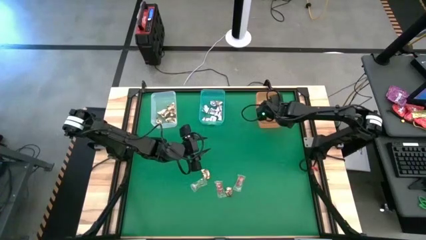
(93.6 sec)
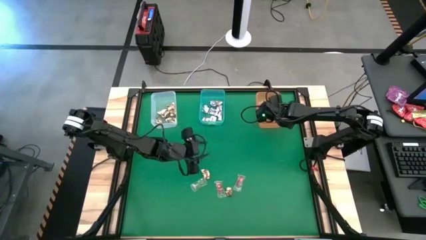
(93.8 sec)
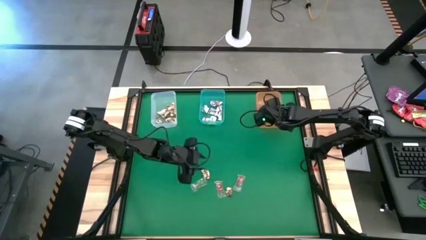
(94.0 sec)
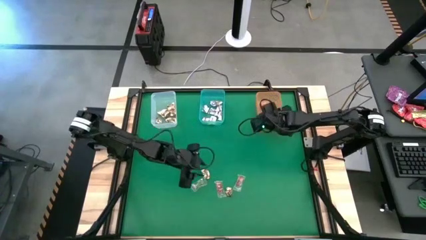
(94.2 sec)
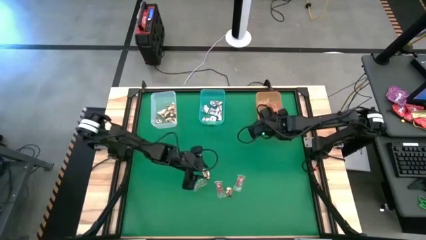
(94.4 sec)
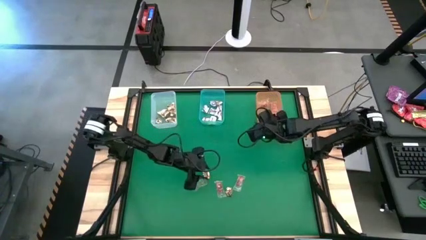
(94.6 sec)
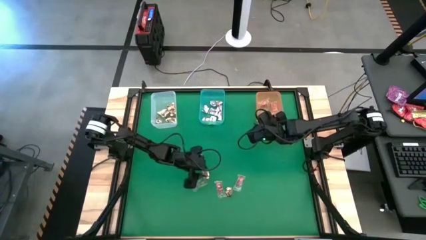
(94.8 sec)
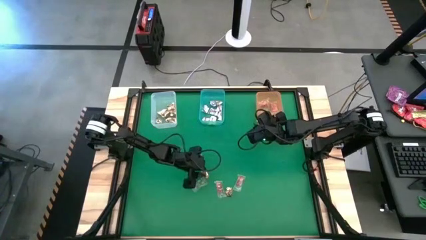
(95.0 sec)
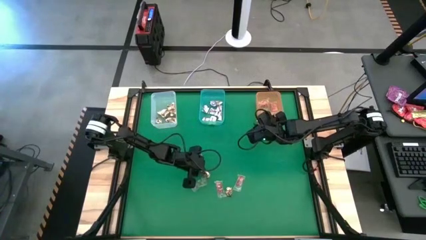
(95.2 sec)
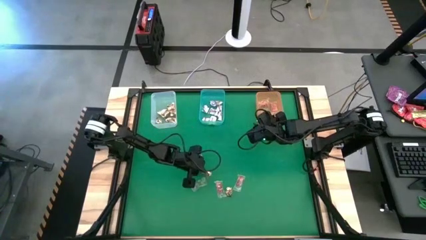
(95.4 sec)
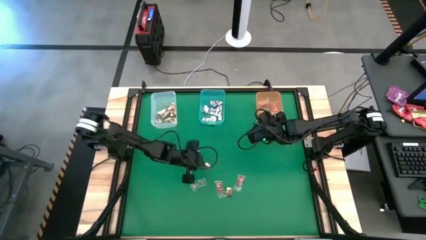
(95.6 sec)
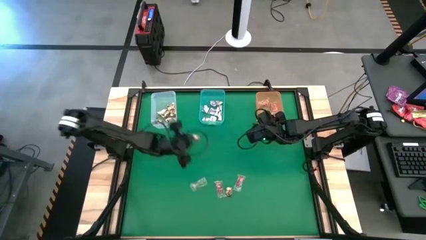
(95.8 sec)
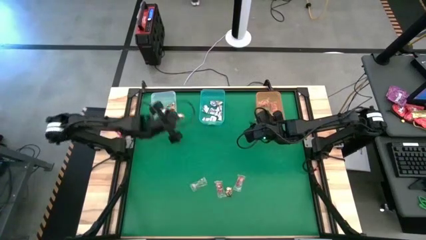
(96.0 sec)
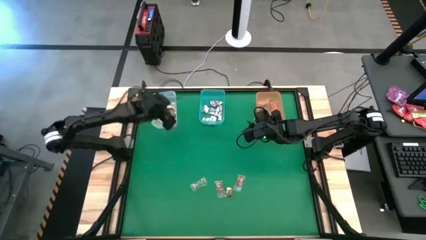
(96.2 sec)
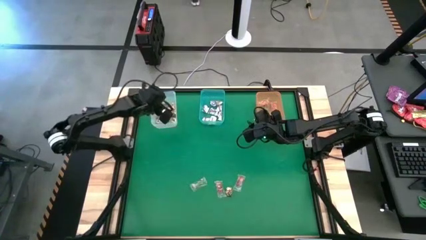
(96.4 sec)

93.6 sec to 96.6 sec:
Task: Sort candy by brand, put in halloween buckets
Put the gold wrap candy into the white bin

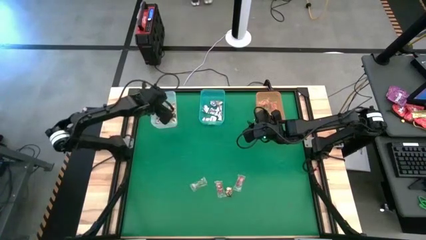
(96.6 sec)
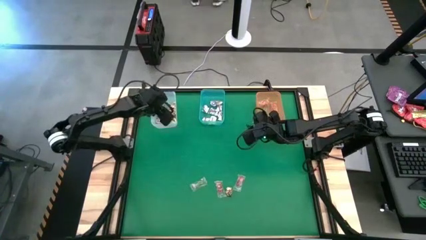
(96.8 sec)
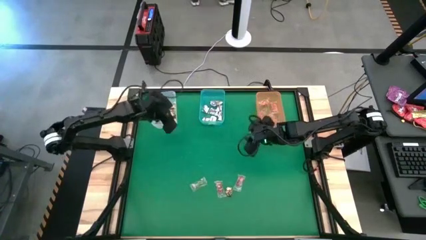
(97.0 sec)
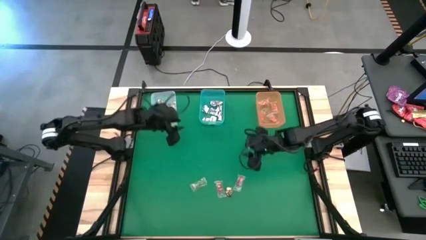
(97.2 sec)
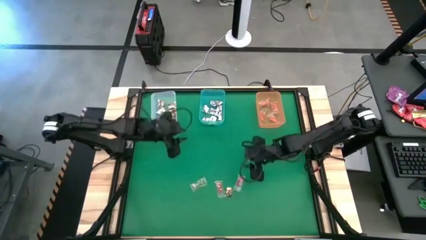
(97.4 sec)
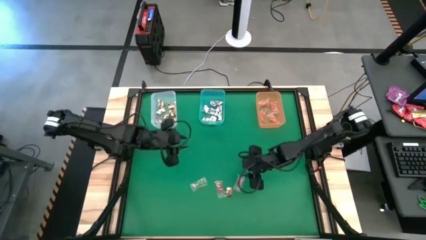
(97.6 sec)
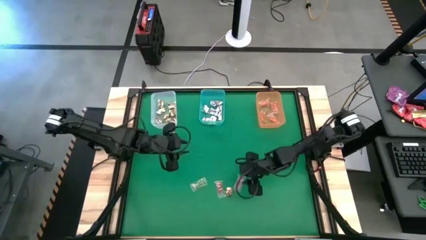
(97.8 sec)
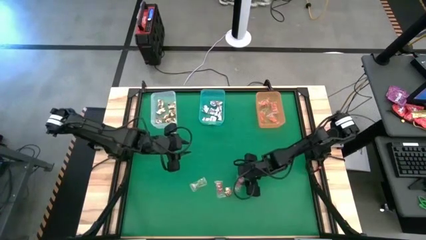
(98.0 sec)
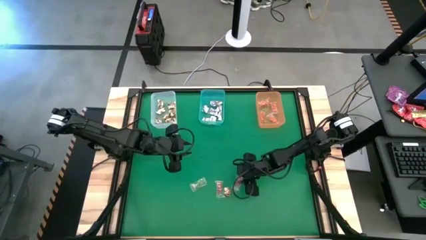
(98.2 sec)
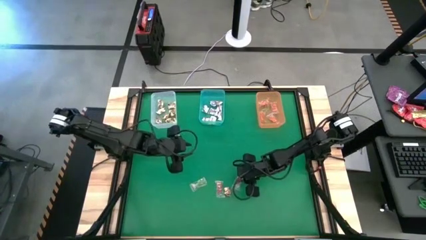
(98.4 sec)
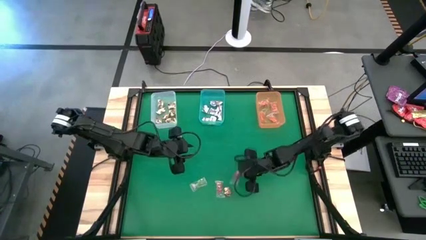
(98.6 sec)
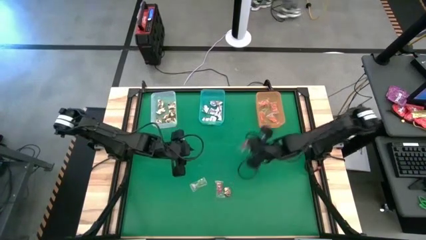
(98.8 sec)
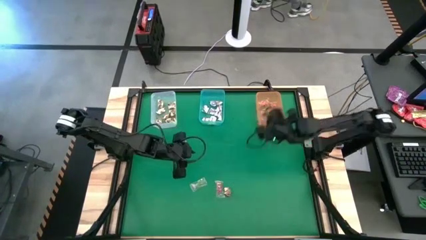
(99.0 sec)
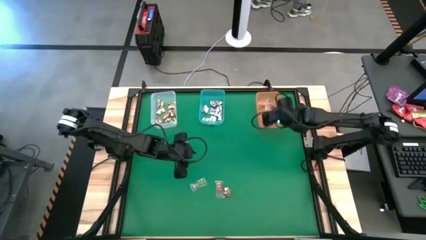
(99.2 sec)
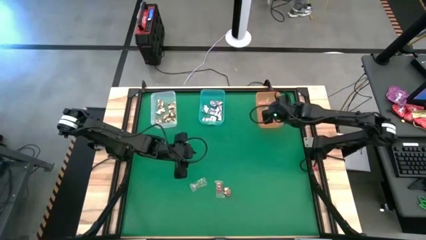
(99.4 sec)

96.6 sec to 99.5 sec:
Put the red gummy into the orange bin

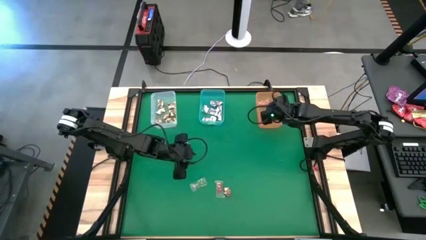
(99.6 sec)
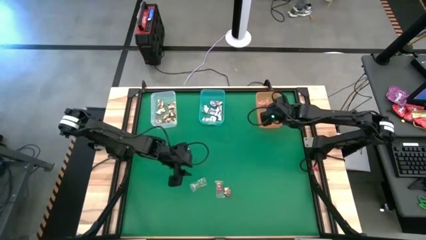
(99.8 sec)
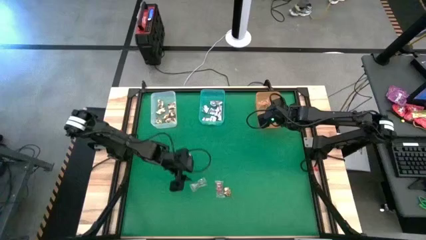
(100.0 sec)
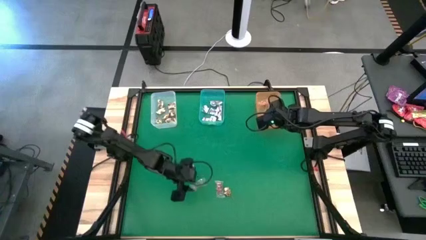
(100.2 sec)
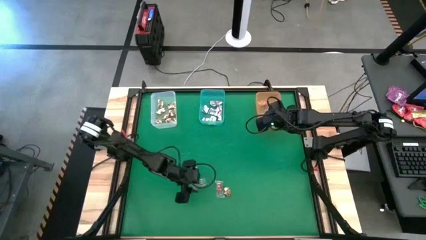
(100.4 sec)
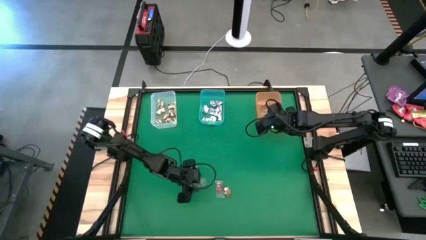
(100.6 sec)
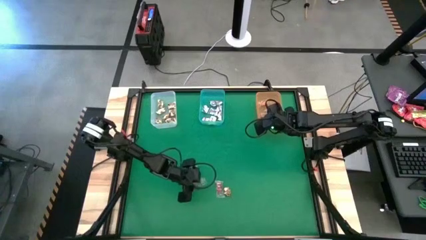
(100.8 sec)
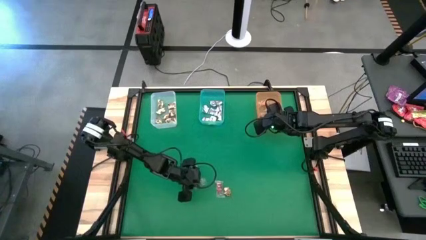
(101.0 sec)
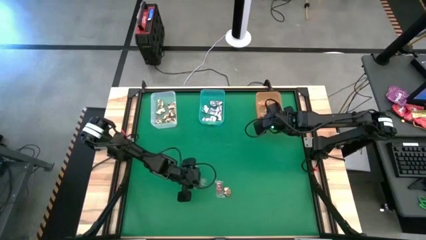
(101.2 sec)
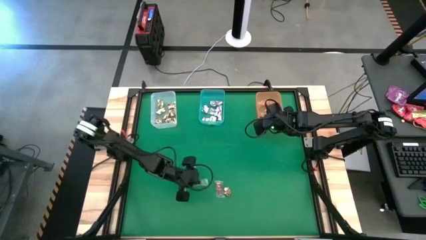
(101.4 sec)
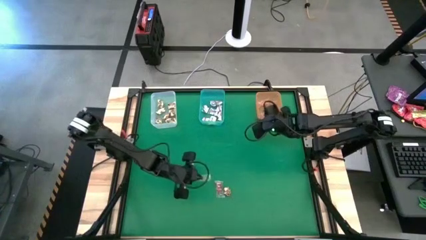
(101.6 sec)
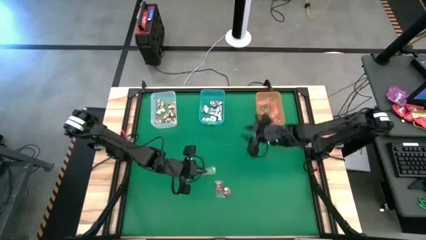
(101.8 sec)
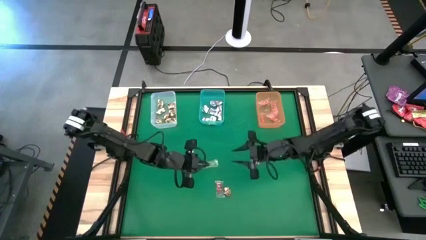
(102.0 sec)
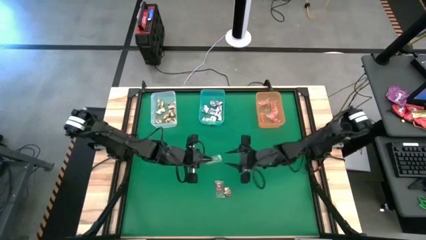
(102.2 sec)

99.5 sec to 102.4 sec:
Put the green gummy into the orange bin

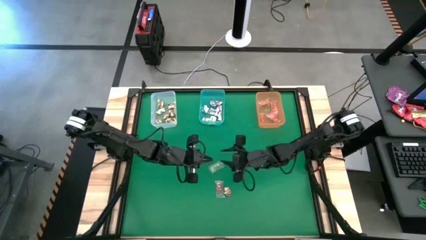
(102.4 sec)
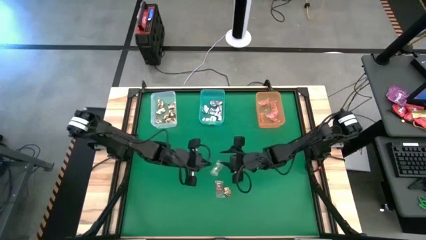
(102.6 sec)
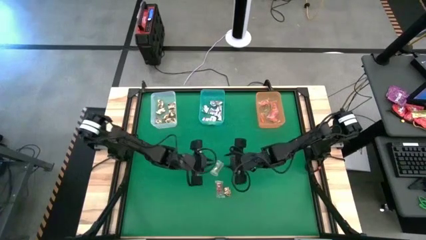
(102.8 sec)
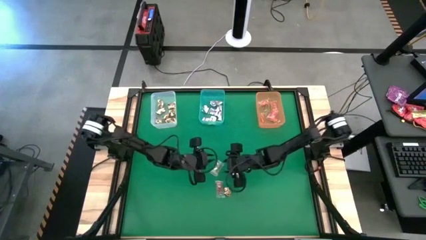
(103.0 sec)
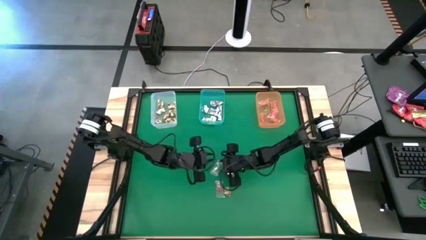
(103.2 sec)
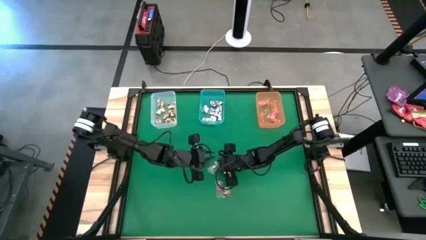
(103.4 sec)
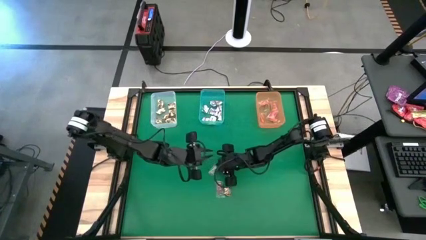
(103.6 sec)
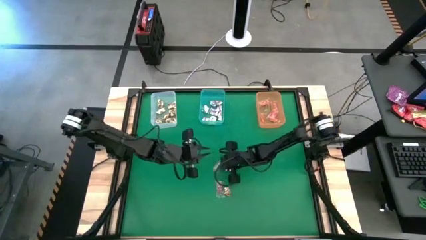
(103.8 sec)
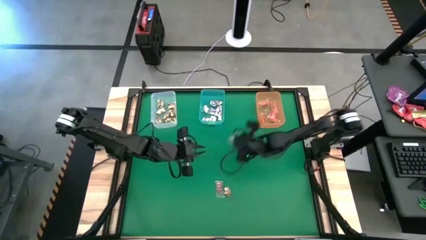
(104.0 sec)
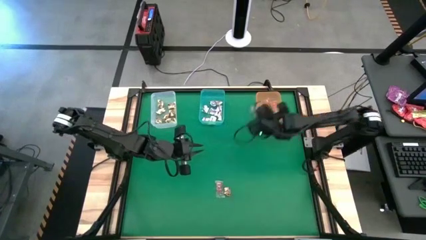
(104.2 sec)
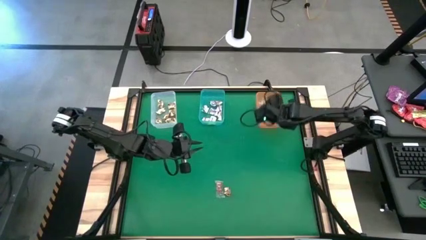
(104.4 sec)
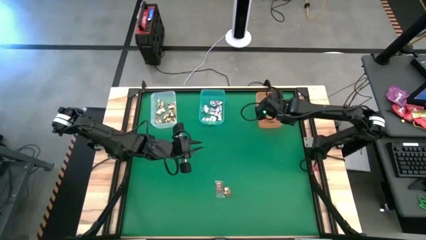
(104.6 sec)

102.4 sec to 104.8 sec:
Put the green gummy into the orange bin

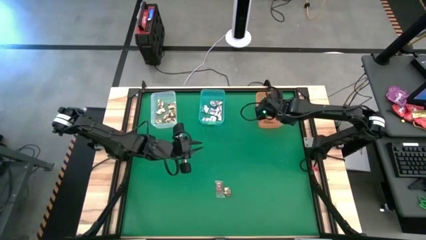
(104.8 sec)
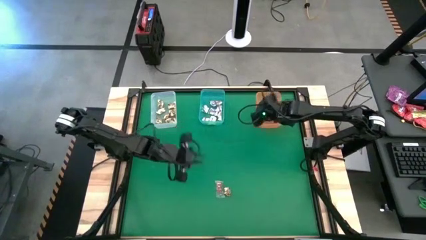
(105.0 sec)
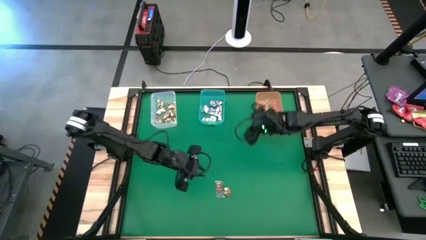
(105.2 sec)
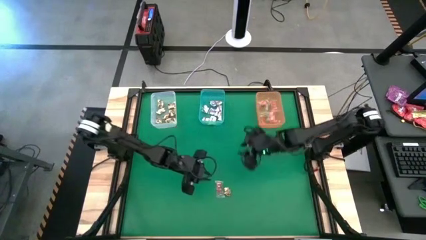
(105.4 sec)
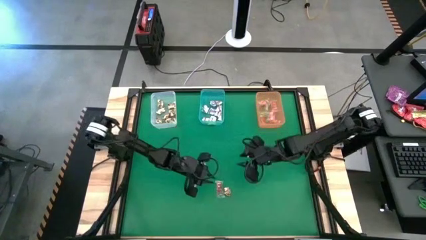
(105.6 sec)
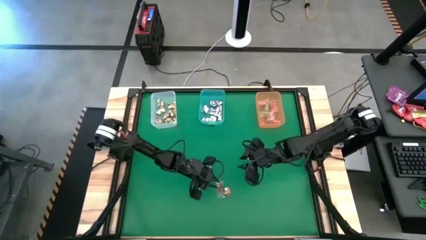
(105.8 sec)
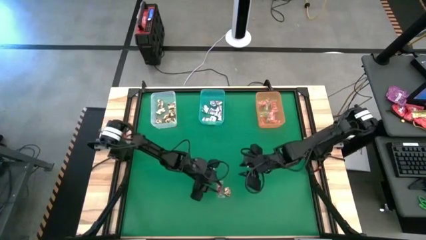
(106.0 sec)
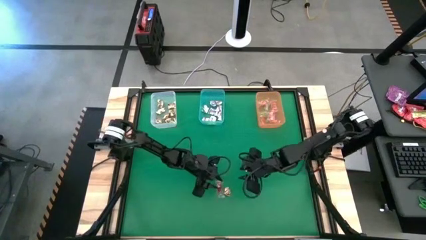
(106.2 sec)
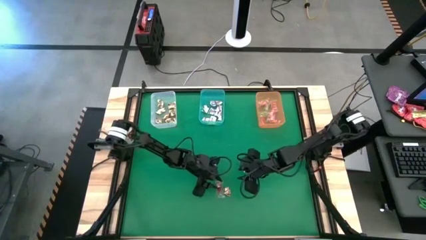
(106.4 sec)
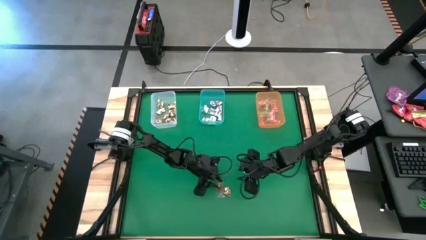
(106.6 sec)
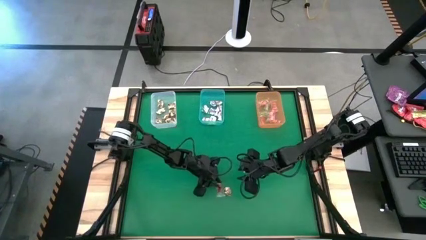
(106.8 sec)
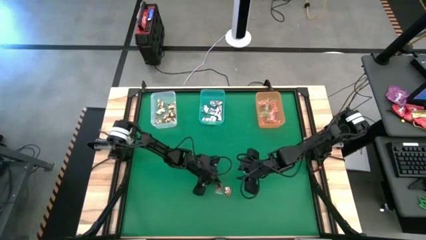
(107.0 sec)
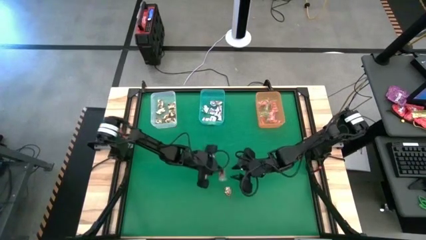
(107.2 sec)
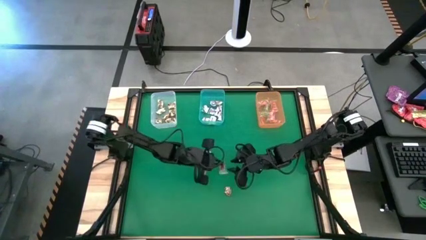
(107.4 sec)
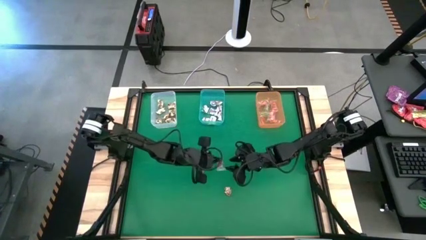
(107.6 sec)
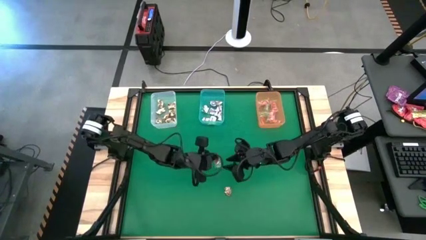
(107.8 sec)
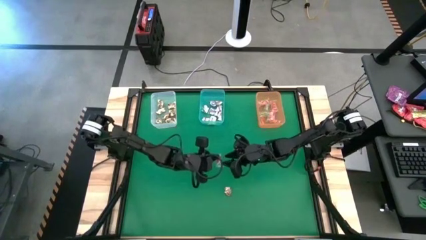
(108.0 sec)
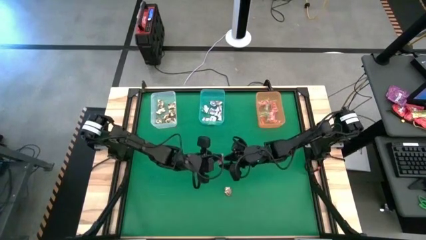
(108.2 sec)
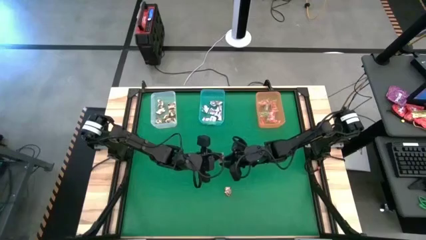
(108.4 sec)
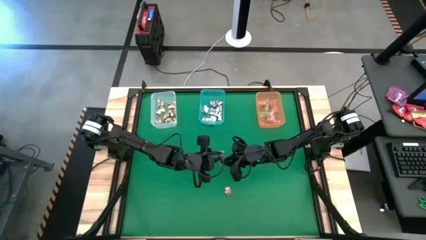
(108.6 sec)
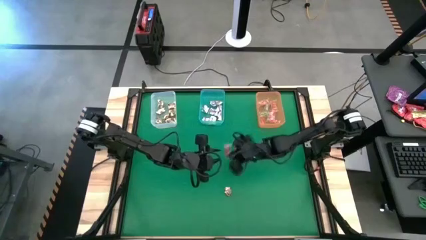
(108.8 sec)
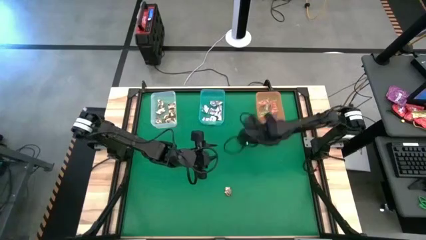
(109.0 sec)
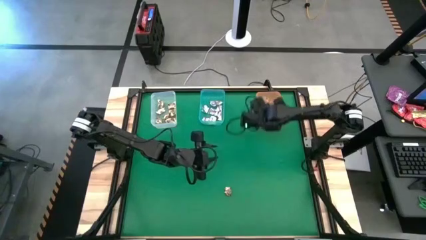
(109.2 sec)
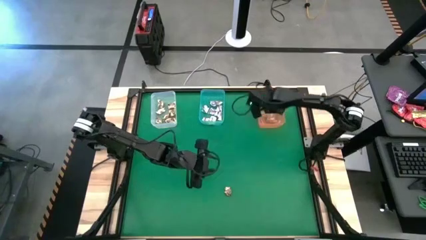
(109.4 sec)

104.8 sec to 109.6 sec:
Put the red gummy into the orange bin

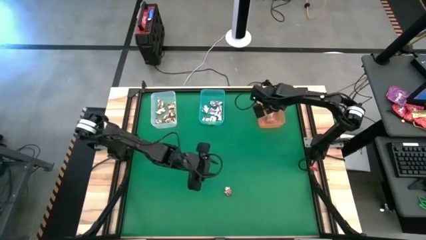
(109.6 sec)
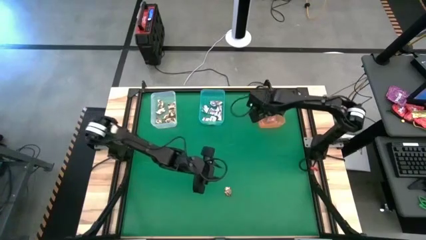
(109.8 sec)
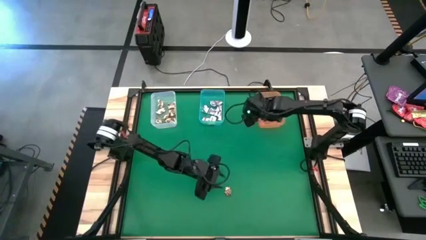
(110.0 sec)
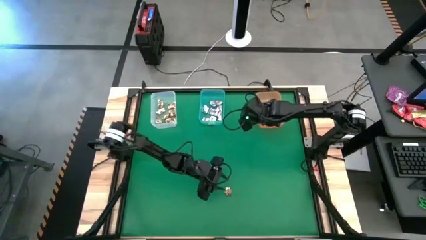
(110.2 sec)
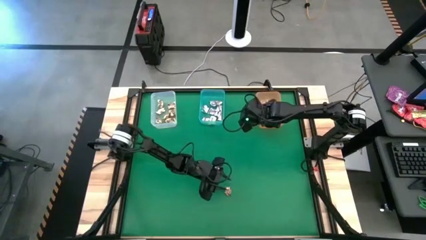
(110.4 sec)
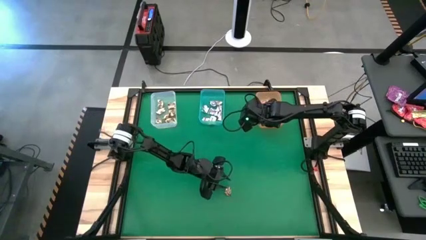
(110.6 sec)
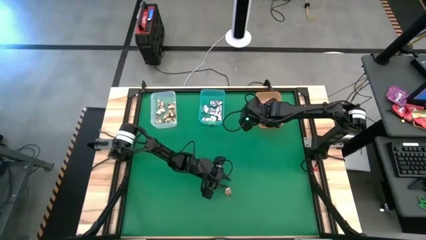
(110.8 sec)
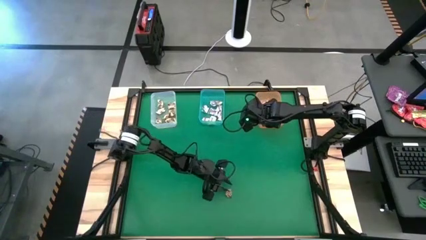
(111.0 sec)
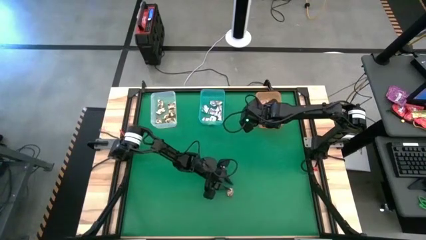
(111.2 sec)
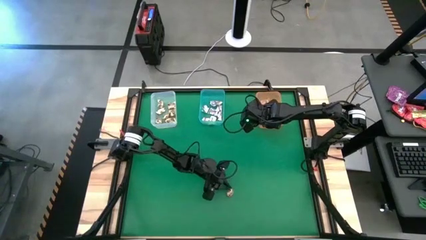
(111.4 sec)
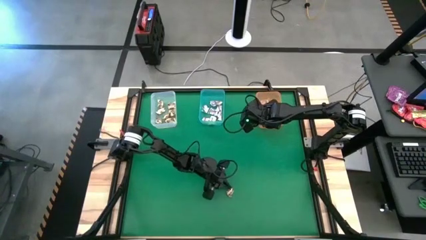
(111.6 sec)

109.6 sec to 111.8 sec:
Put the gold wrap candy into the white bin
